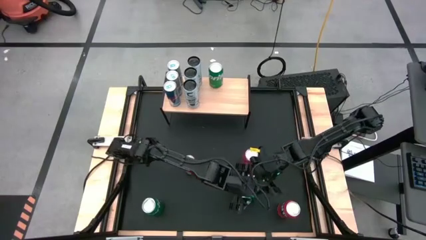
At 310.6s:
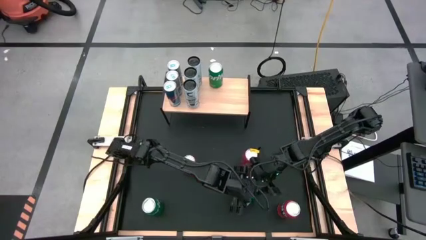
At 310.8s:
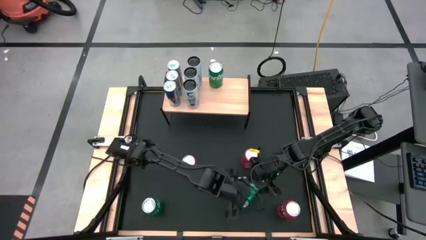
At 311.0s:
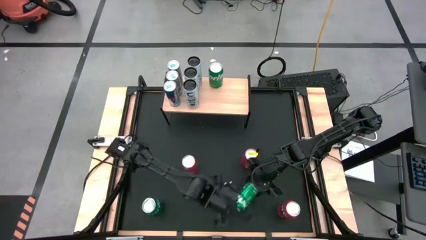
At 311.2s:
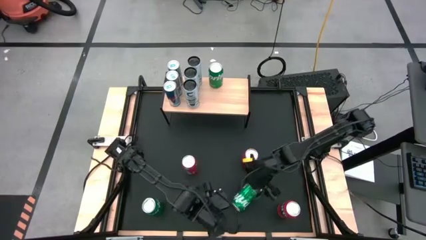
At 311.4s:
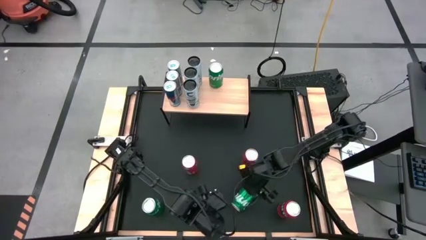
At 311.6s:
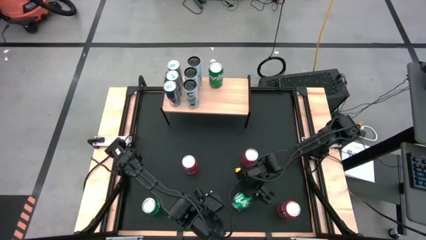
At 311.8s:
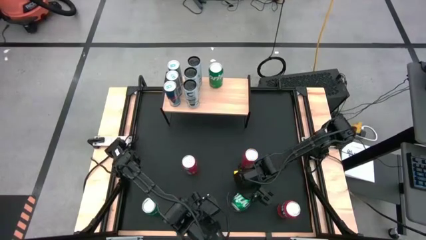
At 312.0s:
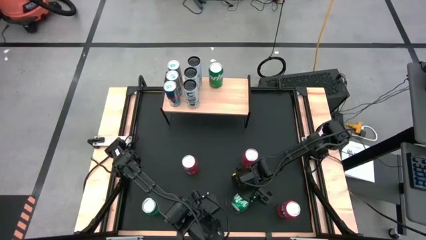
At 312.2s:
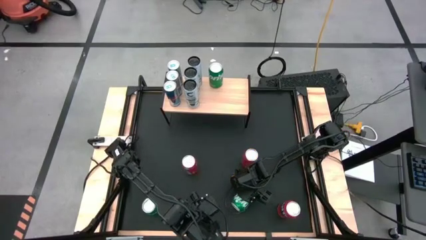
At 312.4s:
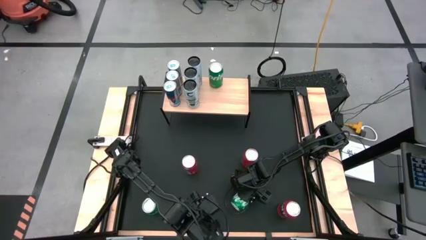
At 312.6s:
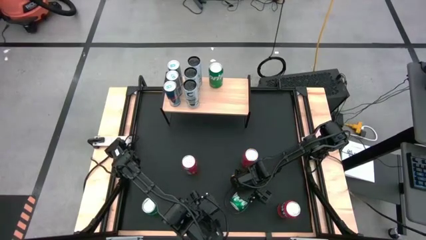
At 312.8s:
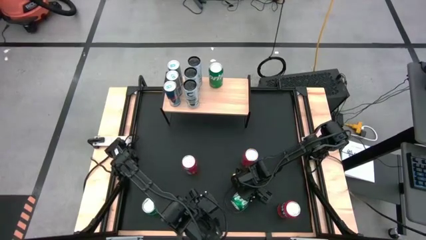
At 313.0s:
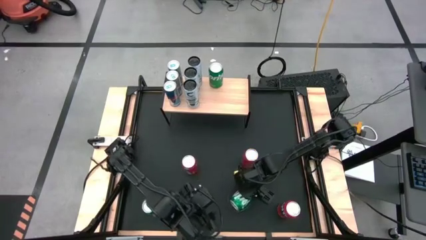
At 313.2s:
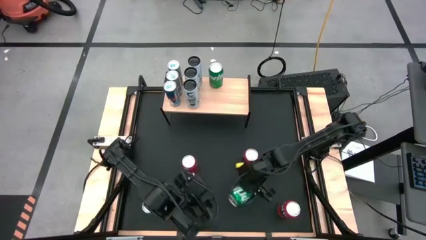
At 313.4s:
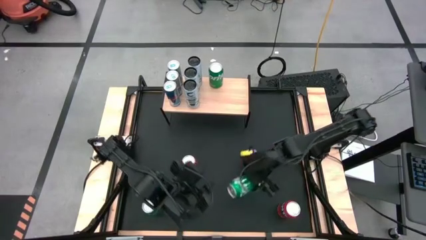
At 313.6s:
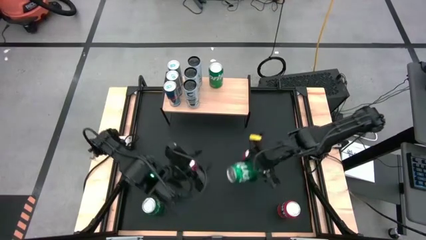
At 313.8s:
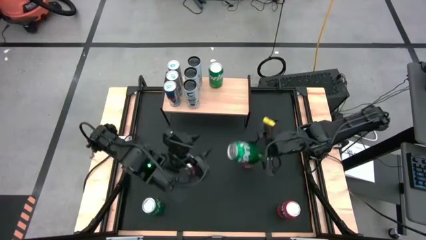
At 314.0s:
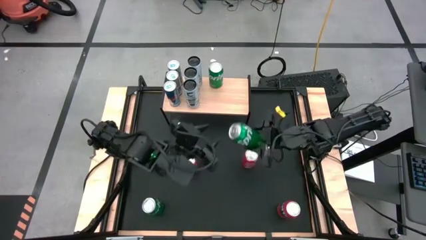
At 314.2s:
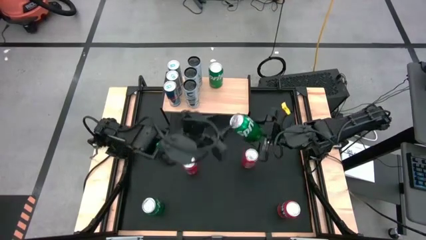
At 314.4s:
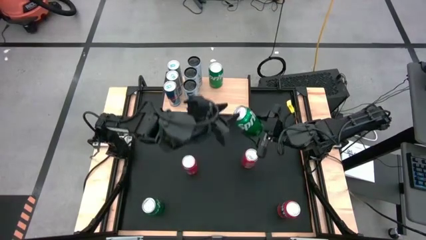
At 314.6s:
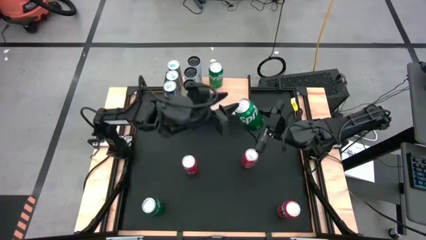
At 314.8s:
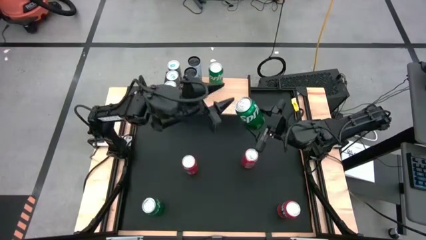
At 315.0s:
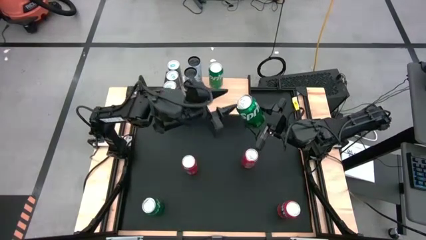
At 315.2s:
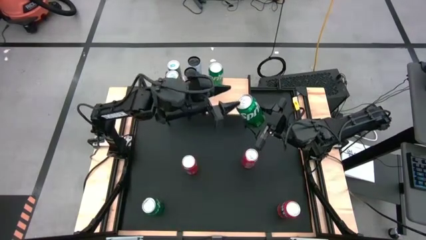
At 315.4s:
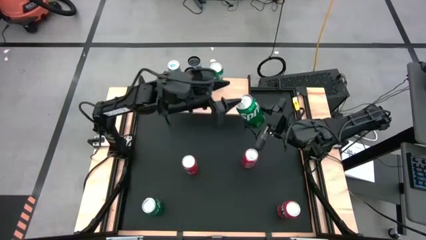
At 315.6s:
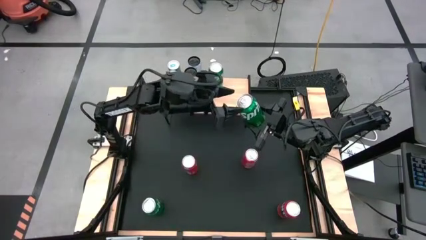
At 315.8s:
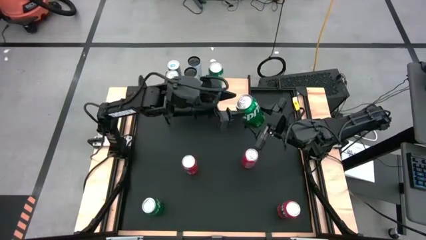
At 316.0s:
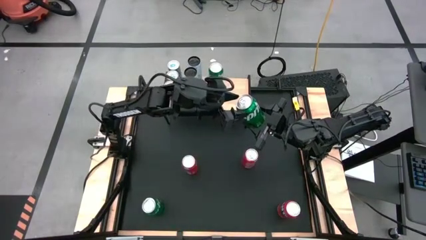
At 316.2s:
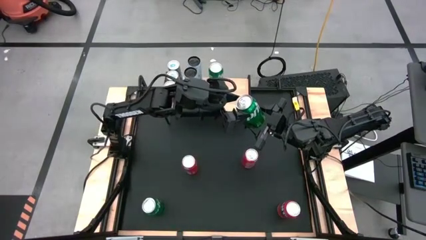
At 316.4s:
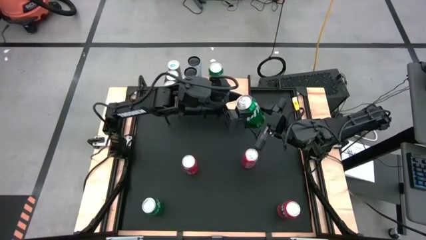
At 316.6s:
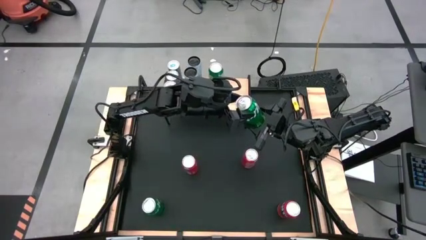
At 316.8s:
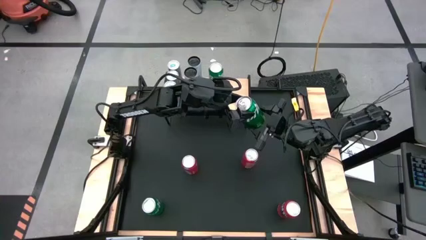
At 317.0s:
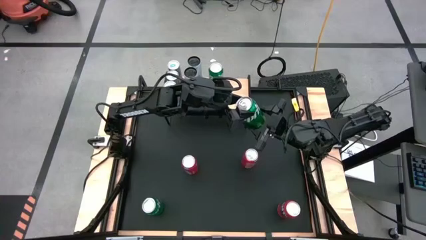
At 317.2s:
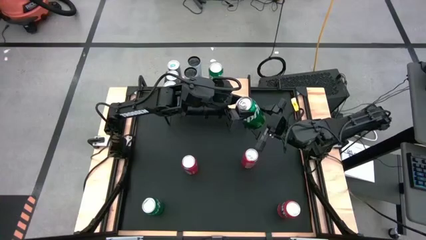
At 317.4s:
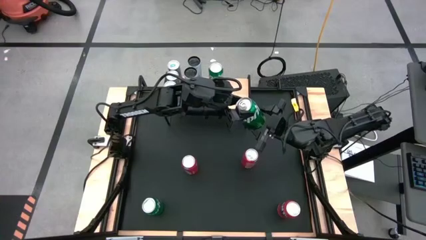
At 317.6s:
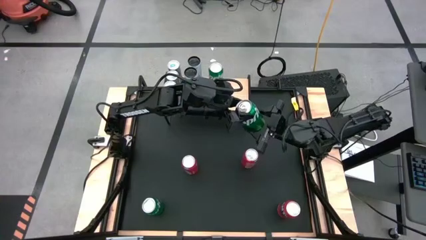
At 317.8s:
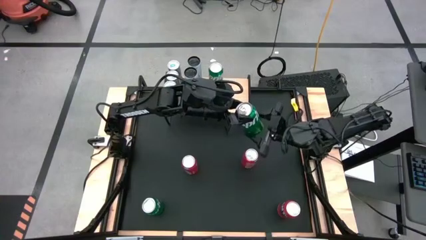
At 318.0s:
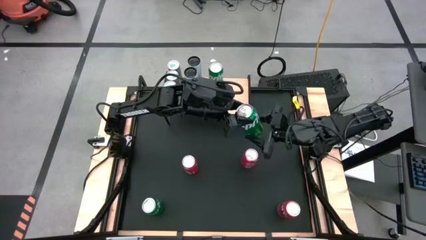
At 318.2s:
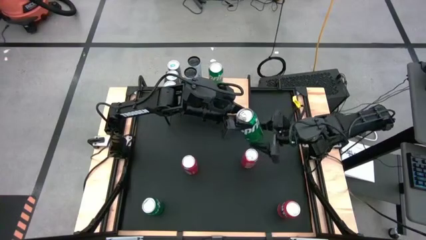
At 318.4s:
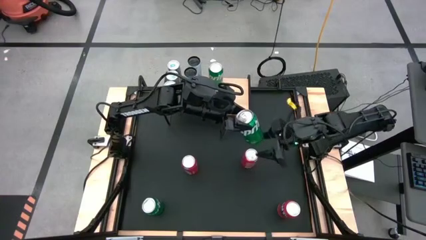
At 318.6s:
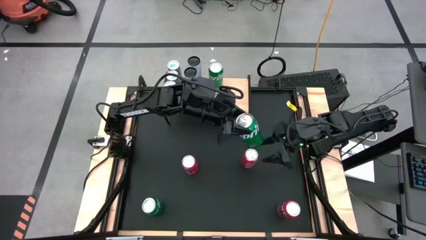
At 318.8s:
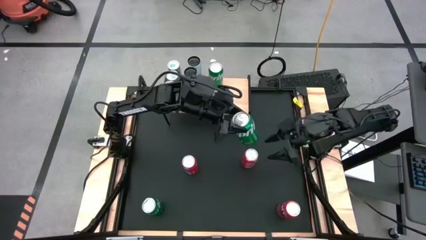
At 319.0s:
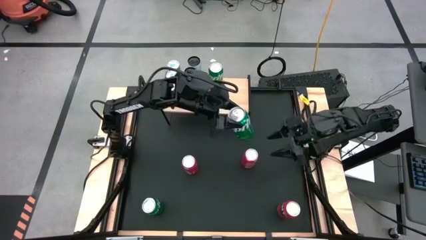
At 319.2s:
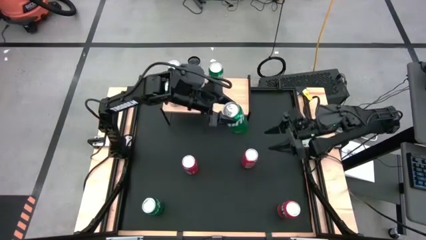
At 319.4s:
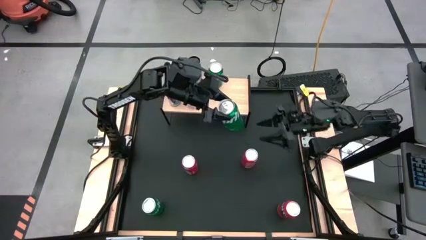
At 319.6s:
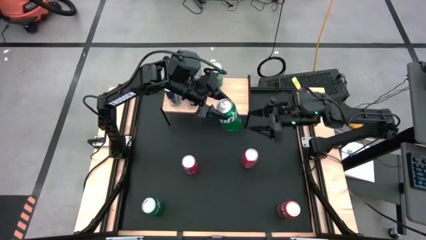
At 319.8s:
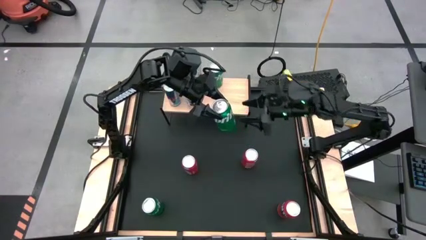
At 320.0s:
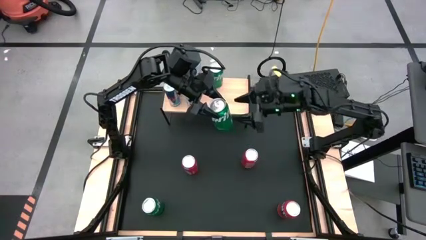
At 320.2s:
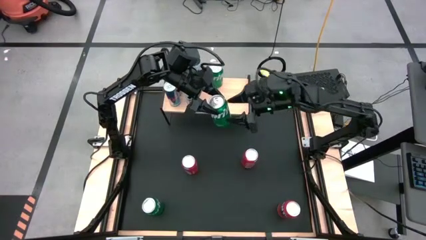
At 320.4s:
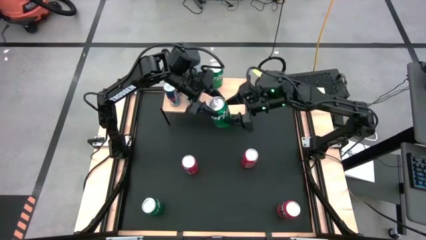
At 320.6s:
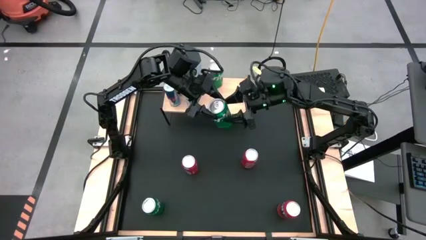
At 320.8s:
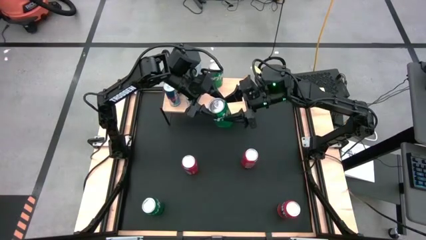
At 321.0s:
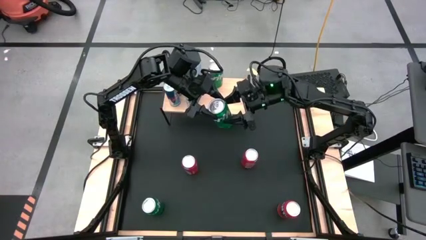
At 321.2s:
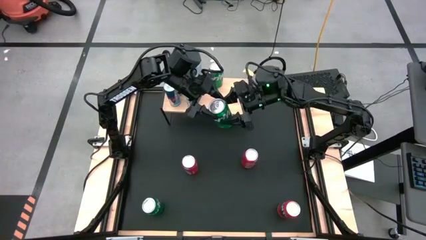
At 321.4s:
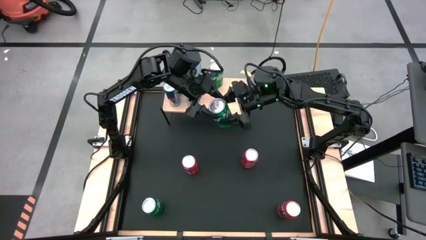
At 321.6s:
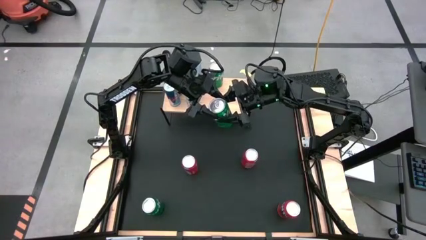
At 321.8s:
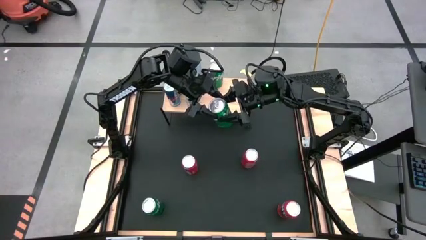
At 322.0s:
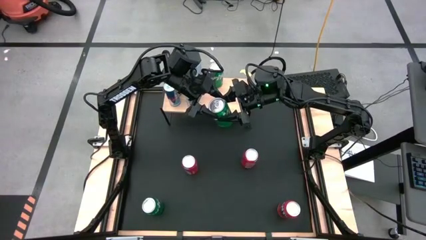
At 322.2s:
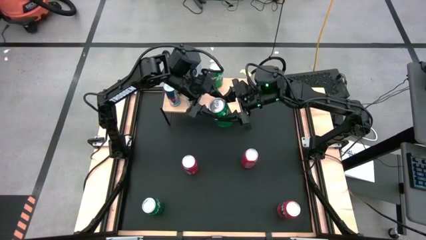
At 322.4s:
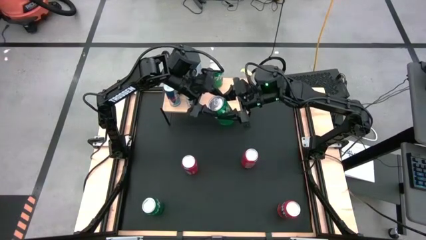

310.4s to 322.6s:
Task: Place canned beverage on shelf
Put the top green soda can on the shelf

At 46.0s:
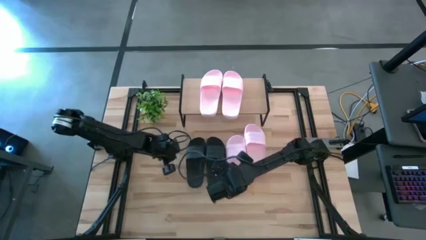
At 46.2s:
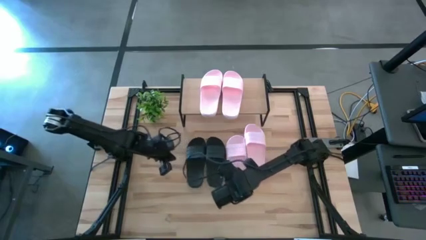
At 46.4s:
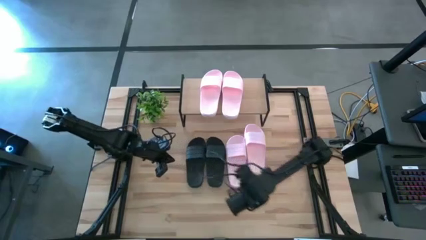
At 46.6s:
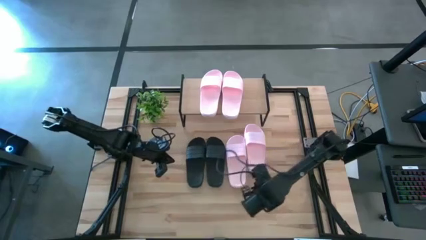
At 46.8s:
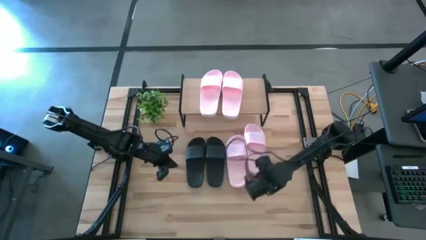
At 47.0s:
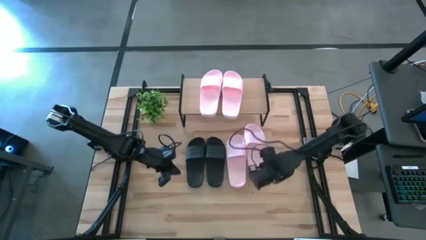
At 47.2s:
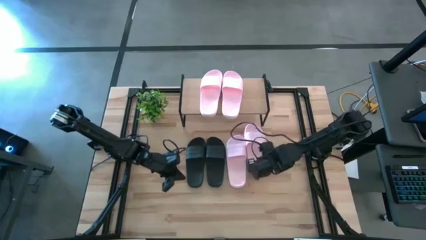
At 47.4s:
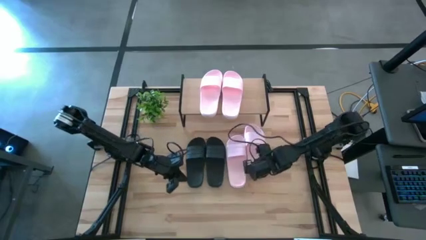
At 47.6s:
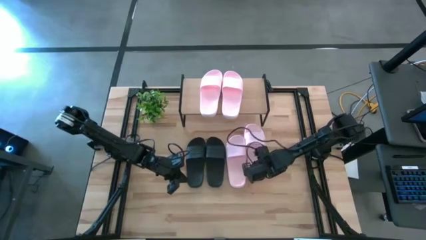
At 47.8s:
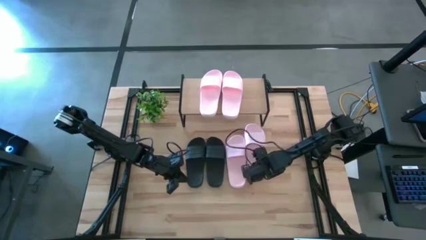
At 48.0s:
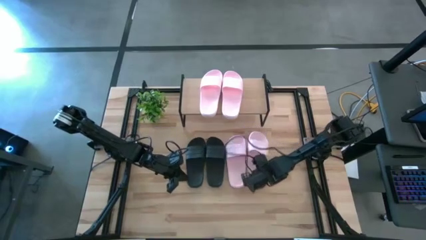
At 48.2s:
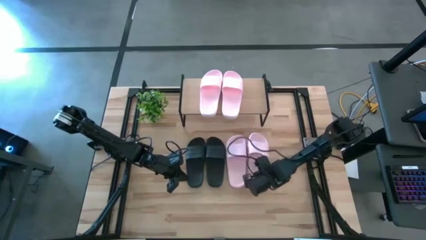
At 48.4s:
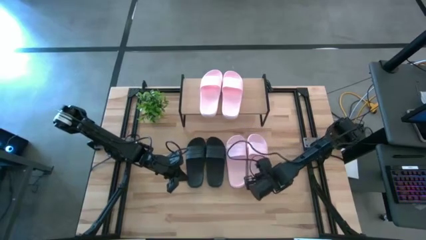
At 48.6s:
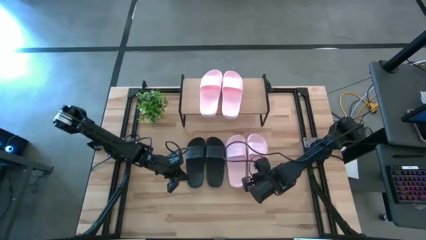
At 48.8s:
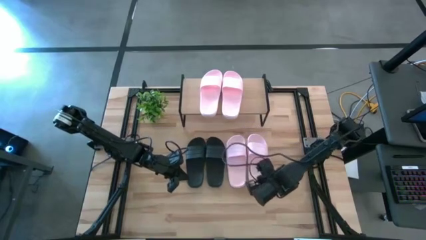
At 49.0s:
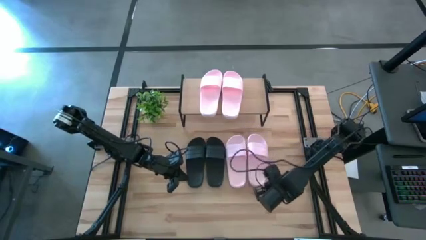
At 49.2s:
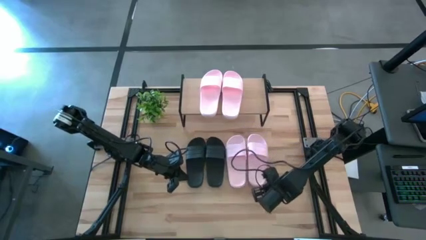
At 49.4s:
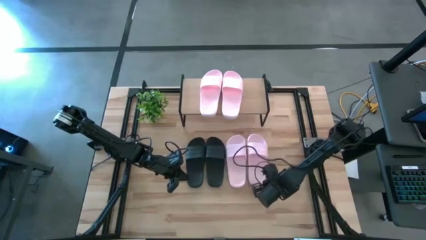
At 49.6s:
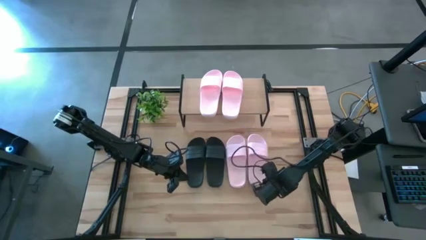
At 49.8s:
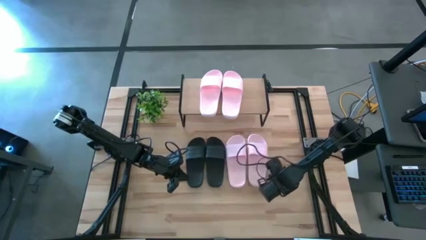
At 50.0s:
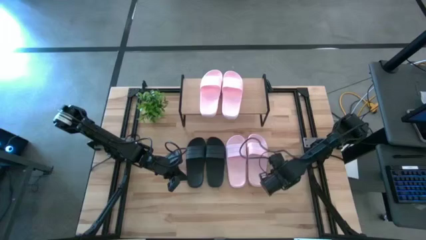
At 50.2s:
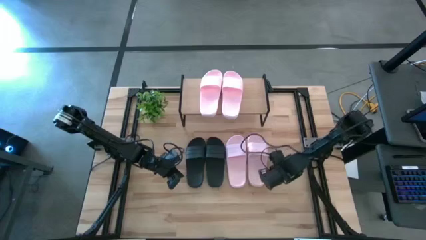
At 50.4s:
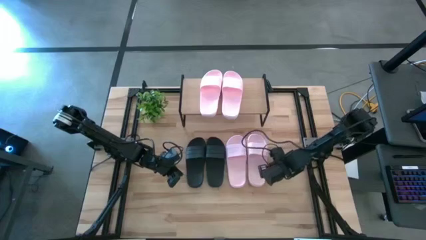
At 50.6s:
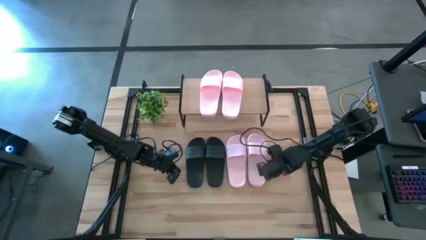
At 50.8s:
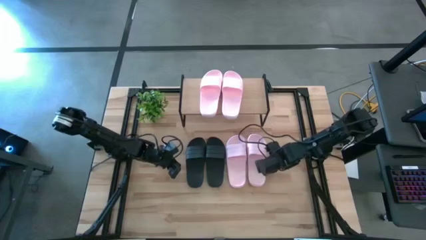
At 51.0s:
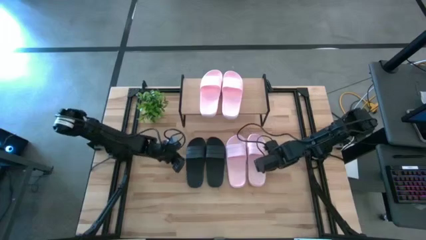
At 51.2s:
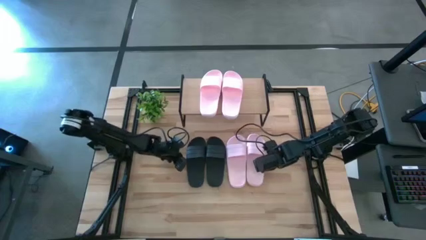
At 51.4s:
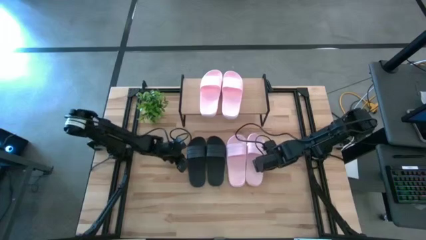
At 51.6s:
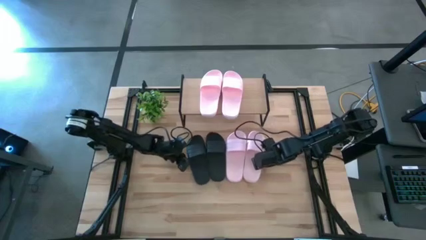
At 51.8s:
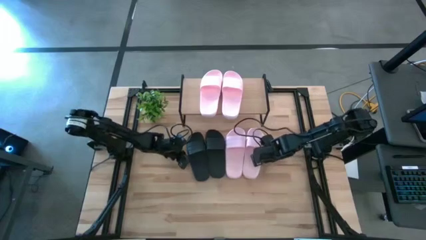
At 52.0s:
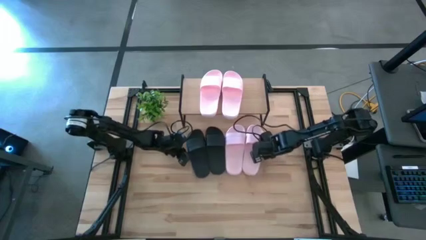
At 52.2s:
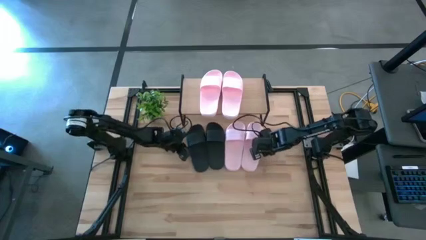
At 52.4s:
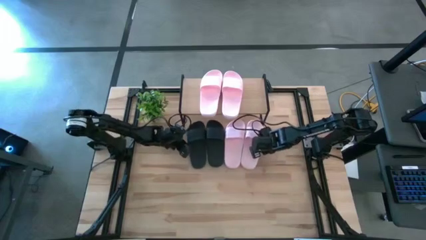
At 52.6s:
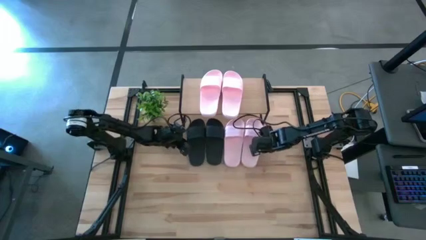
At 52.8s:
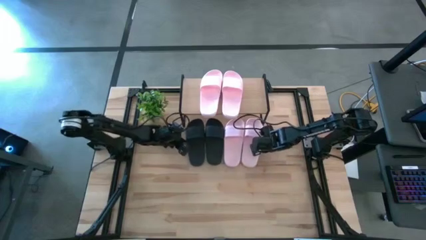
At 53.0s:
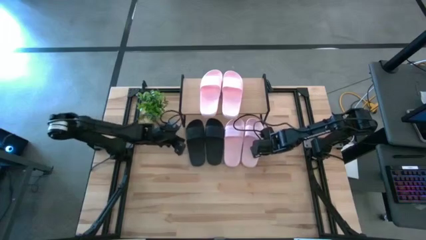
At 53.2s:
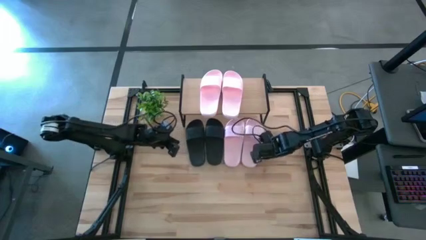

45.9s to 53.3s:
Task: Pick and place slides into the shelf
Adjust the right pink slide to the right side of the table
